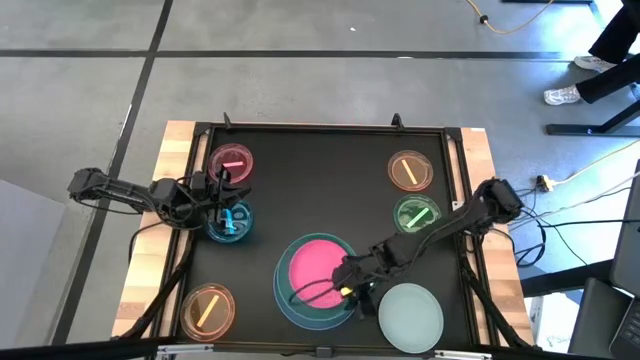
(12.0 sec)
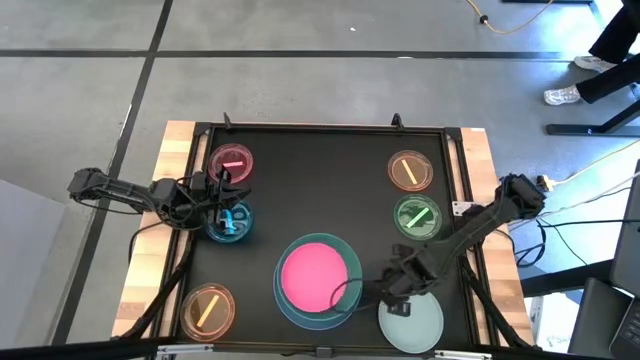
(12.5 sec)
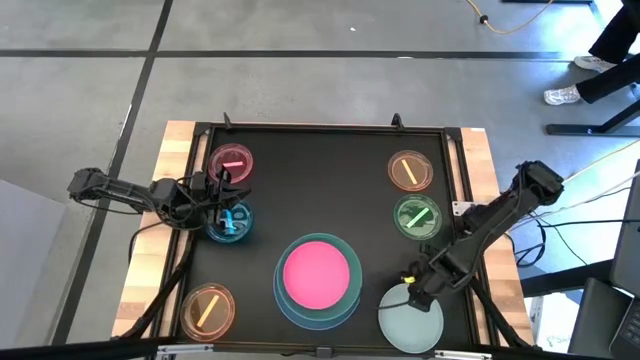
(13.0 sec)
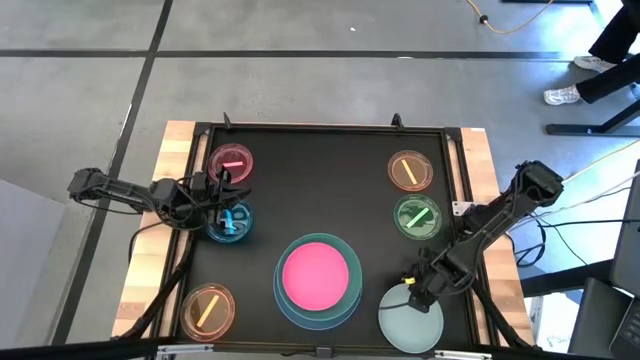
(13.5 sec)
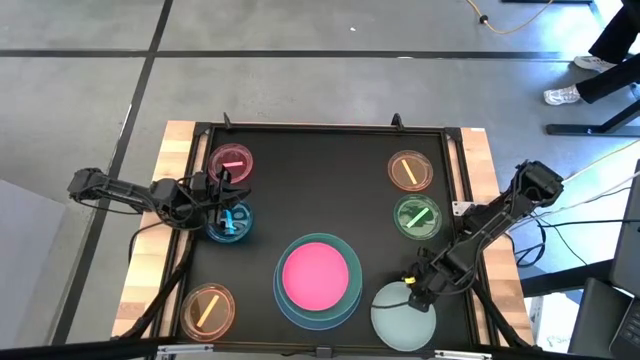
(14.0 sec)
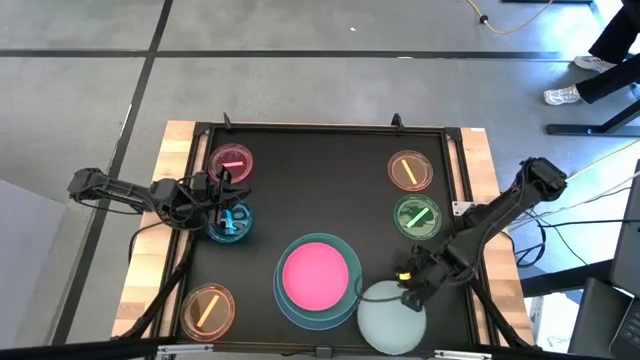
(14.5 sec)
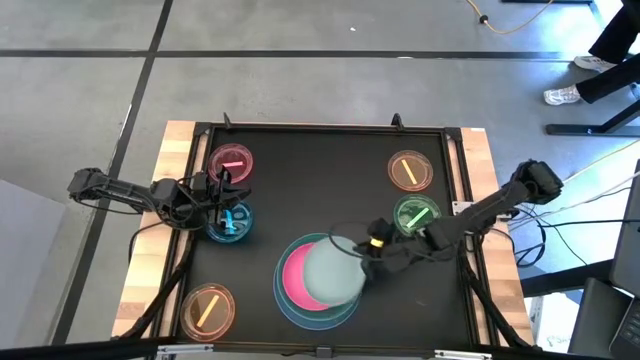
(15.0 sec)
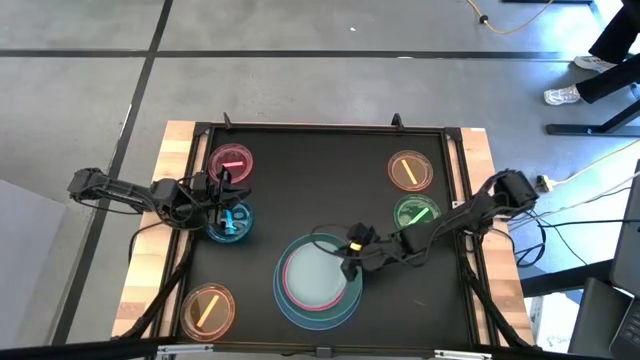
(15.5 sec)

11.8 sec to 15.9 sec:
Task: Stack plastic plates
Stack the white plate on top of the pink plate

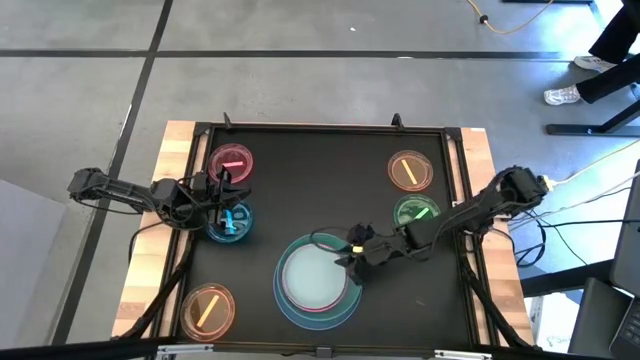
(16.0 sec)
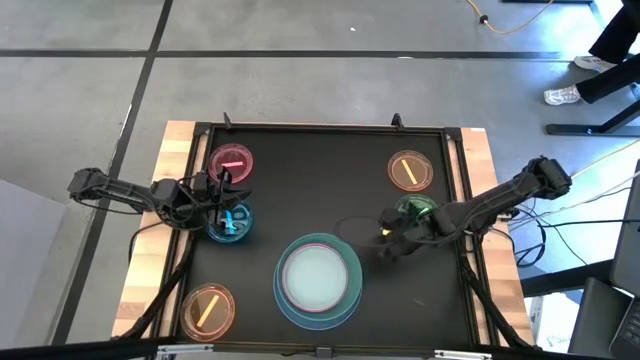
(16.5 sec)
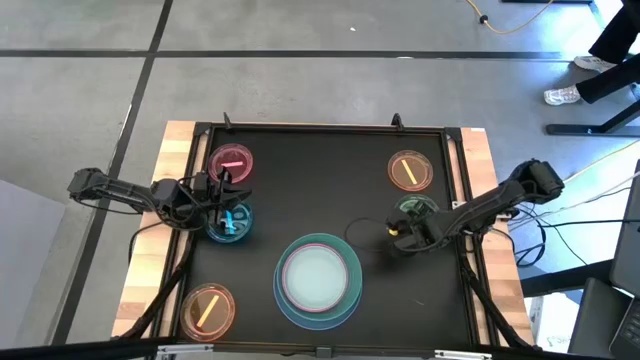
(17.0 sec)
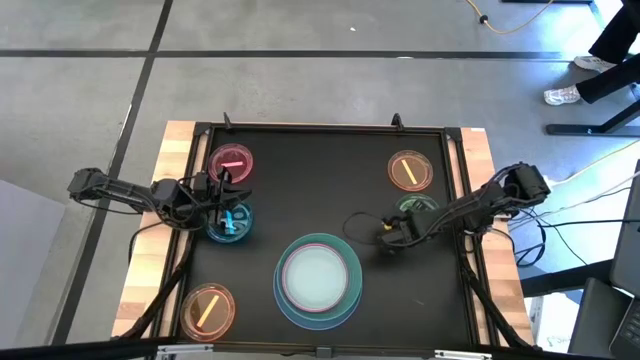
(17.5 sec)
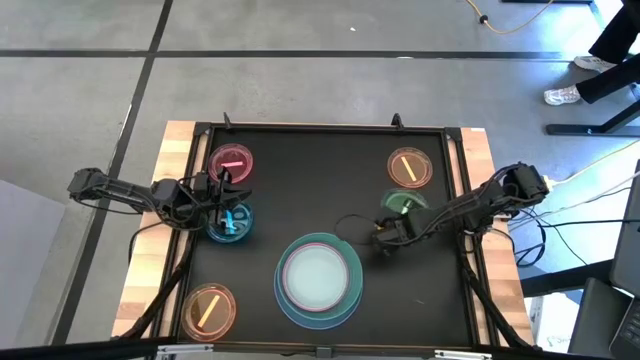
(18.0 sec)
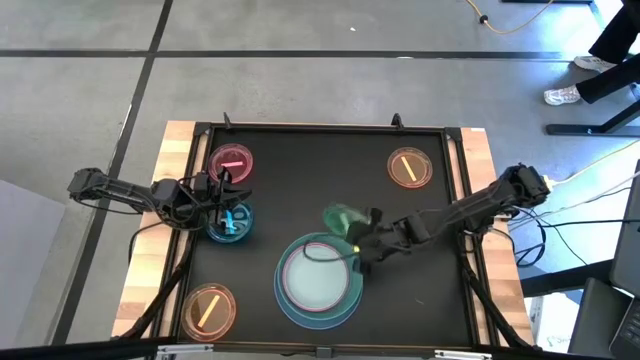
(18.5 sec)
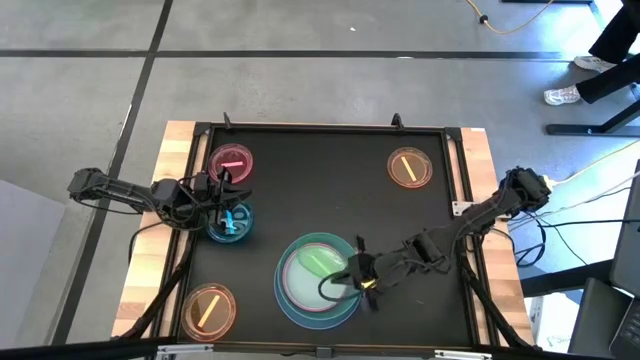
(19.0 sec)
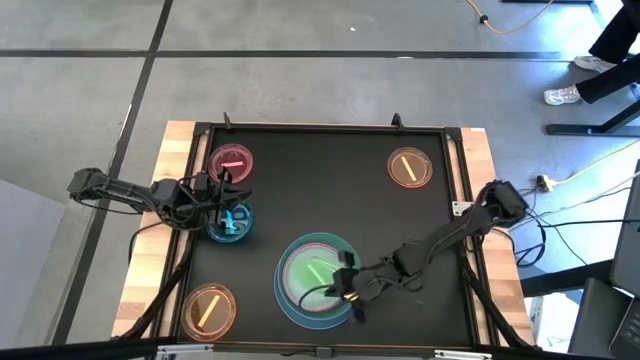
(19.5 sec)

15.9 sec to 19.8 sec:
Stack the light green plate on top of the white plate

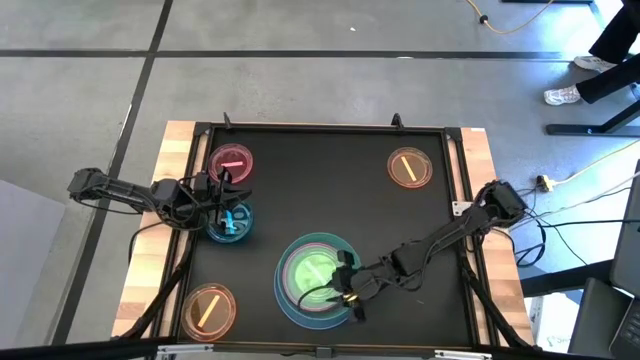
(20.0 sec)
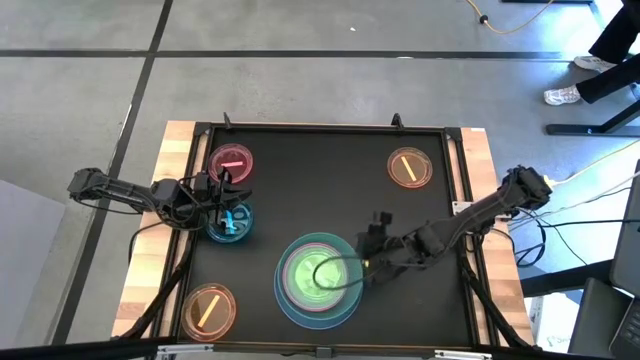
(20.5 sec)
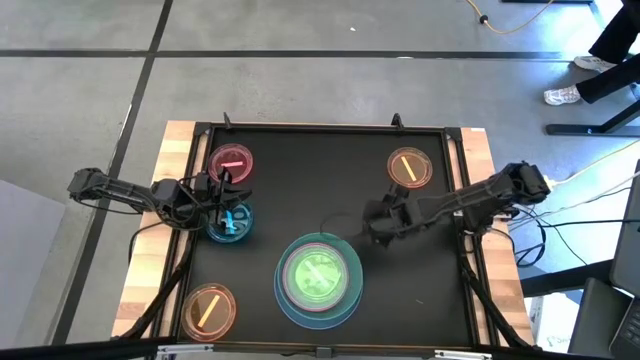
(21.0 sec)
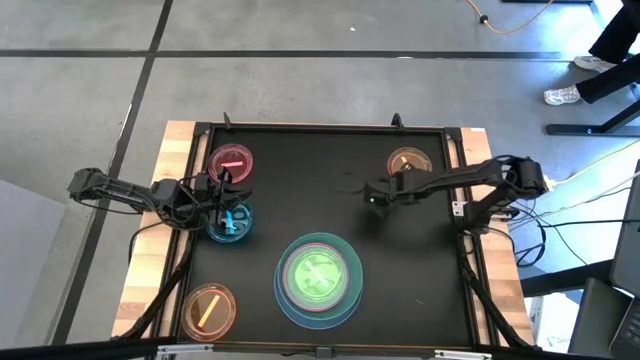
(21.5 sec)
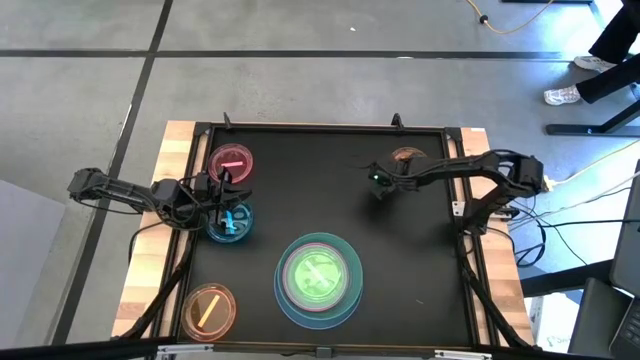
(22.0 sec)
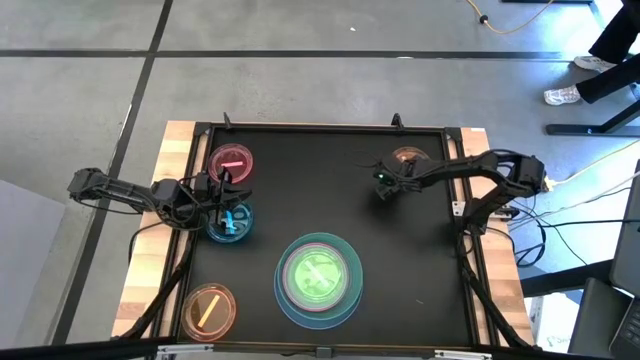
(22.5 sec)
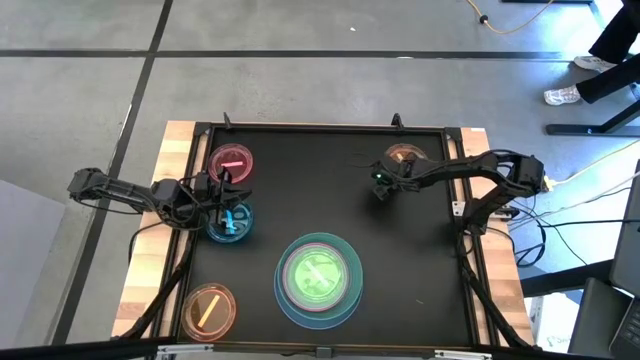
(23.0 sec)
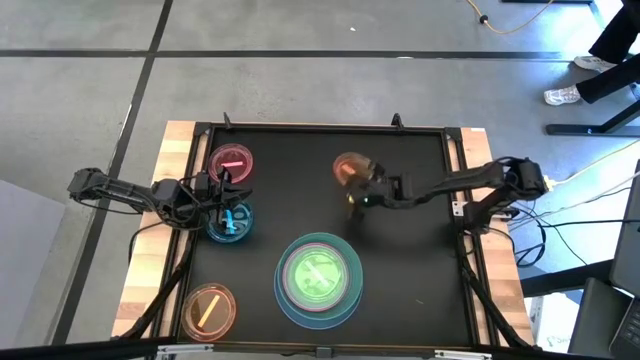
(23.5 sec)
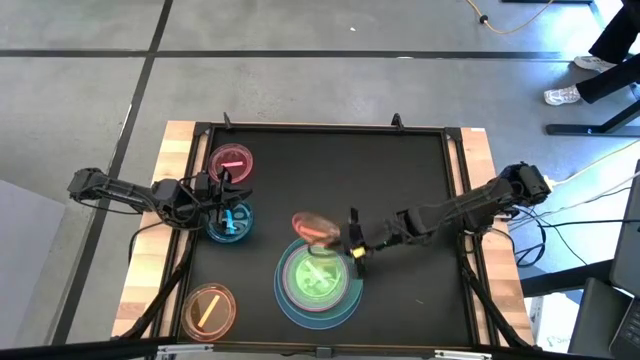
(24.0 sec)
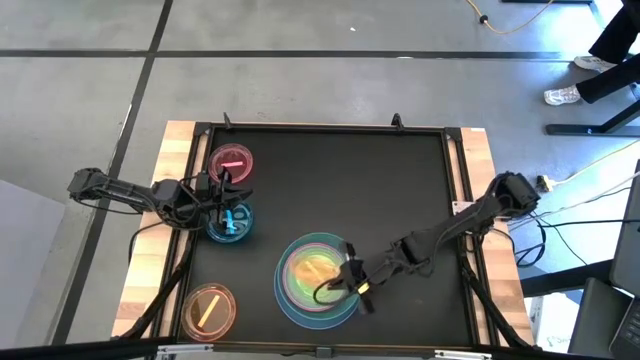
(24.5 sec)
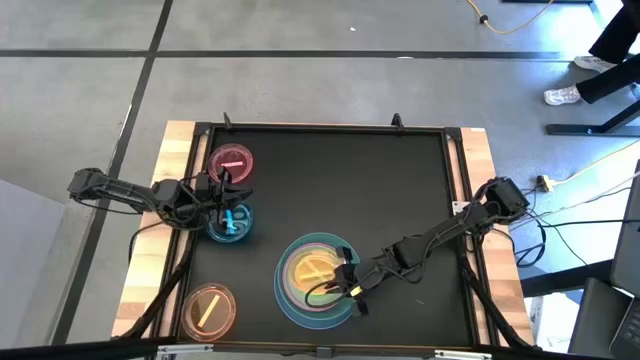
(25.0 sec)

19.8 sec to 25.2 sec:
Stack the top orange plate on top of the light green plate

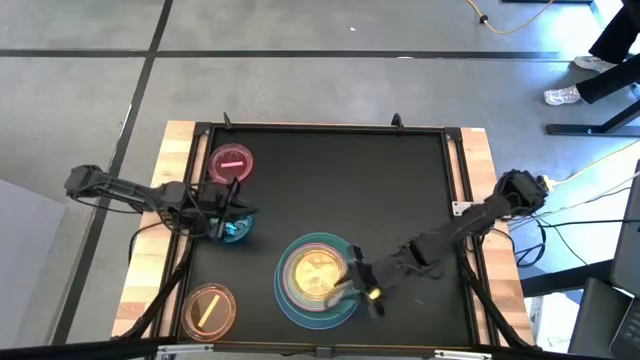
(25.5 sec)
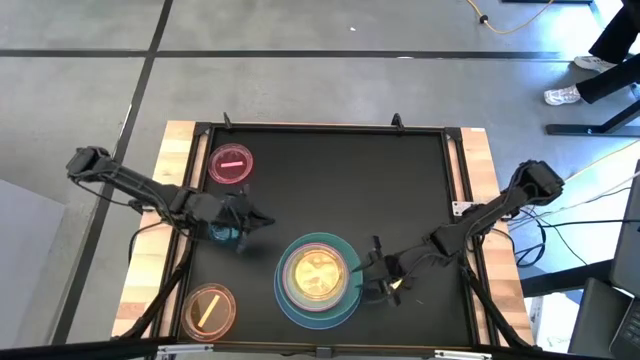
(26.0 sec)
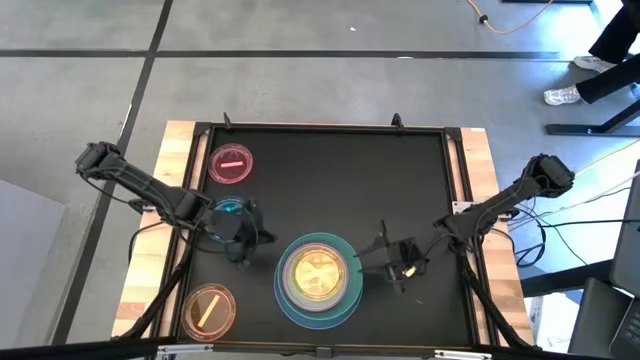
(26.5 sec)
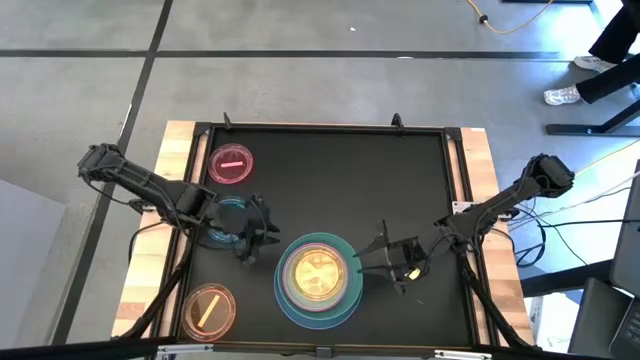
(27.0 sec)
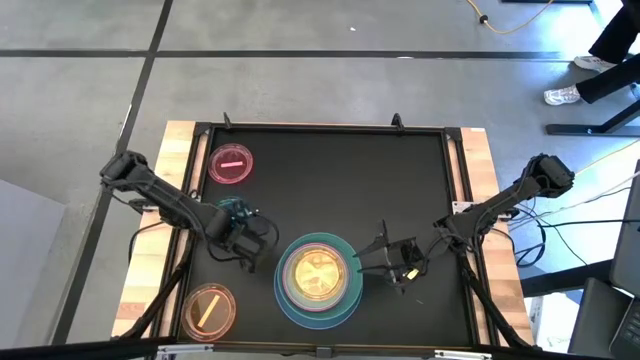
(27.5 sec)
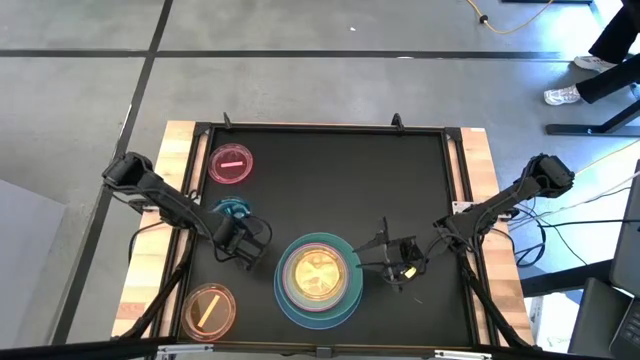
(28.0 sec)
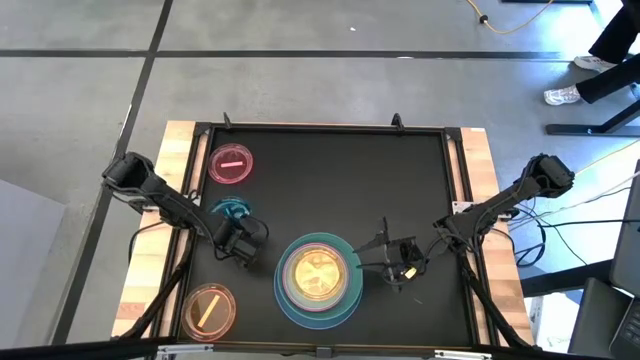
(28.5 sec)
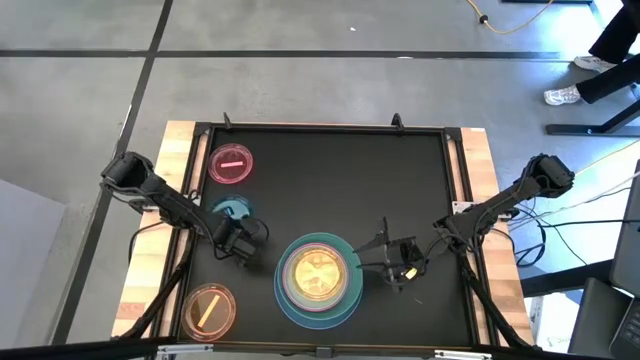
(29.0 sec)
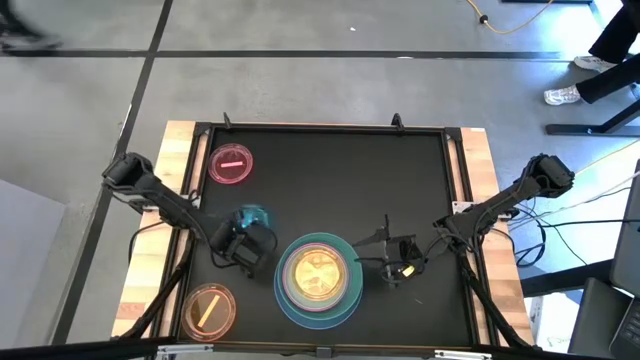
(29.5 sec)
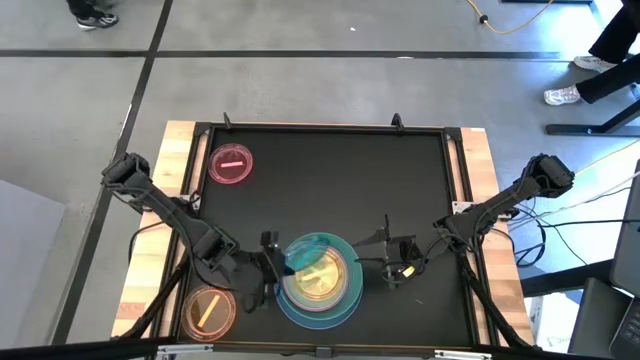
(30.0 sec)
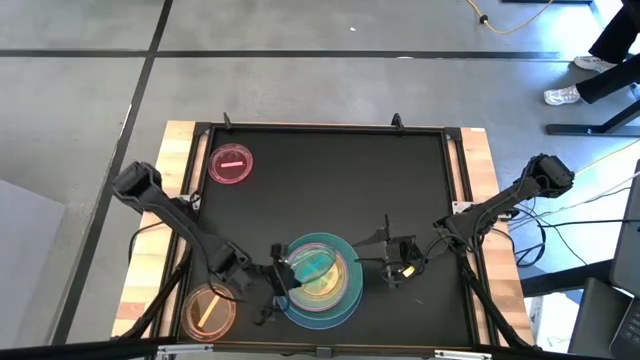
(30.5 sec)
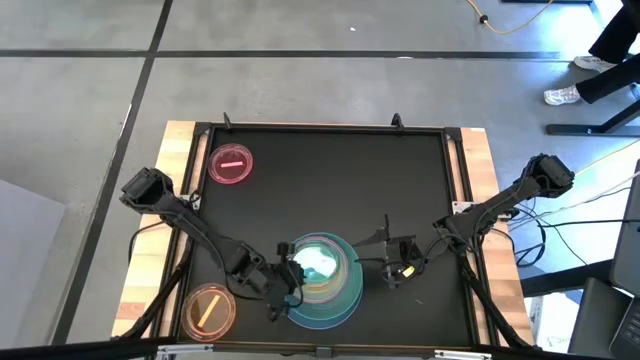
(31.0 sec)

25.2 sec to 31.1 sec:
Stack the dark blue plate on top of the orange plate

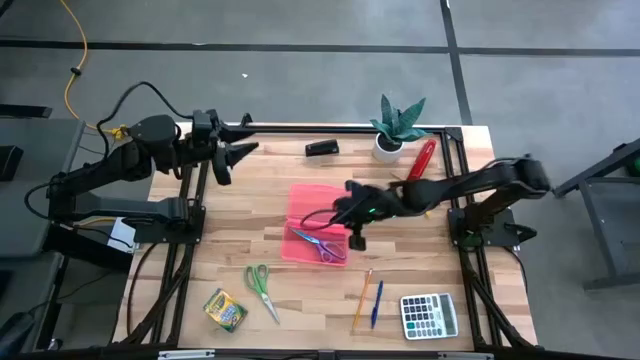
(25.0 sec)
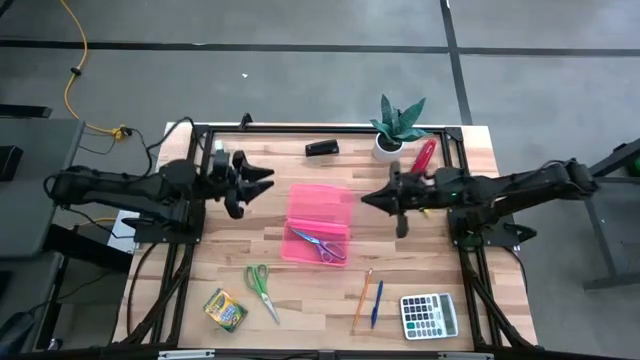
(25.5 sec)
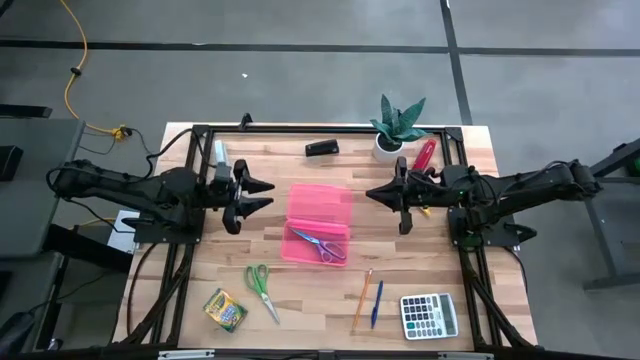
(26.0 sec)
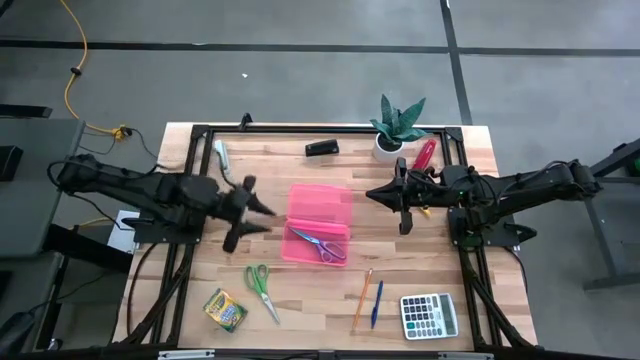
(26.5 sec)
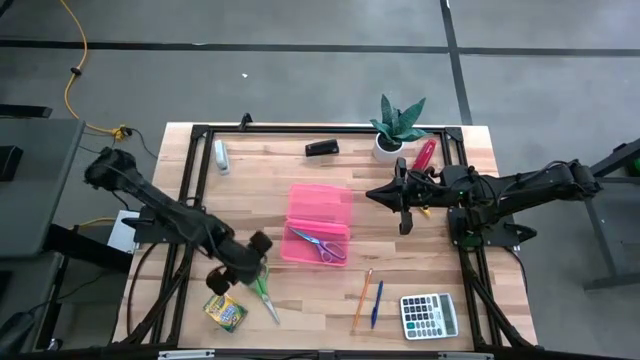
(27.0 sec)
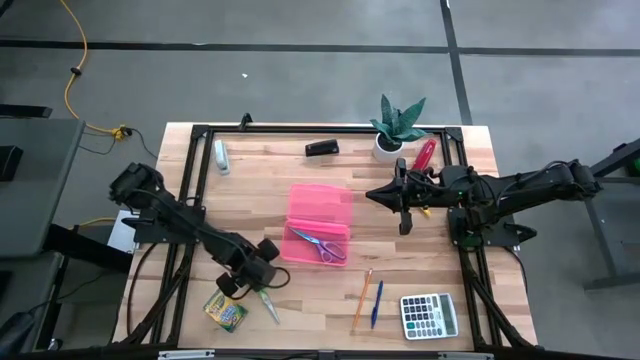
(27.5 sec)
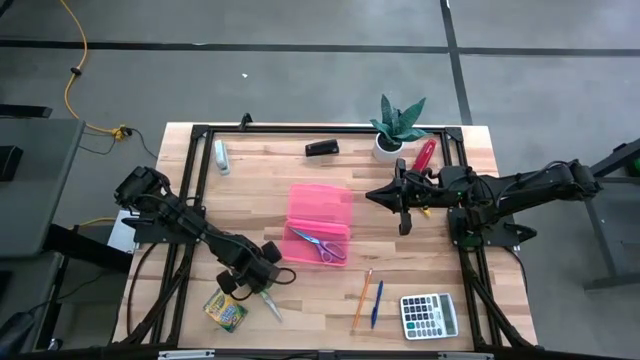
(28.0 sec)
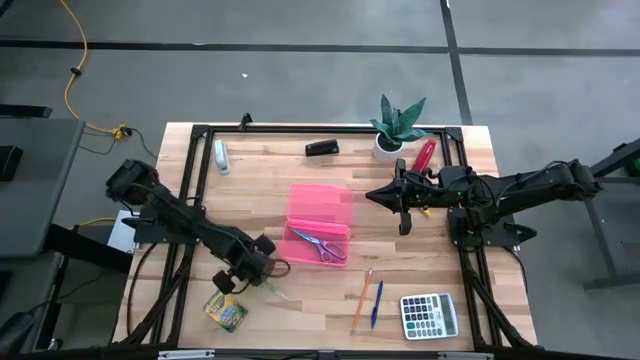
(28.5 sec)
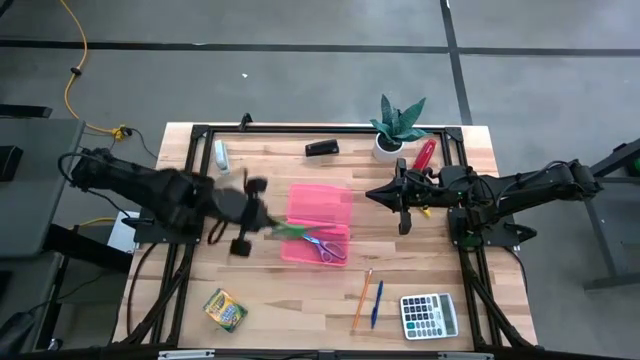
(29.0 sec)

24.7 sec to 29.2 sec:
Task: Pick & place school supplies into a supply box
Put the green scissors into the pink supply box
